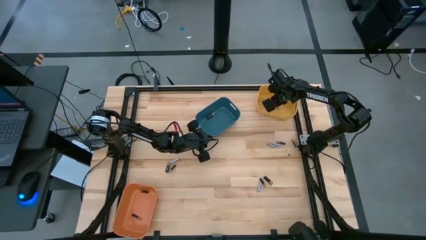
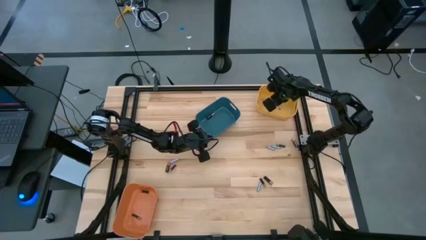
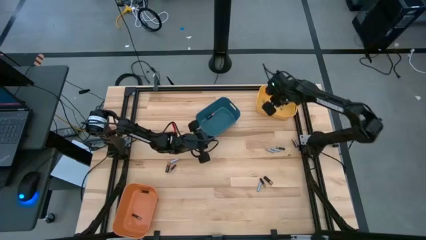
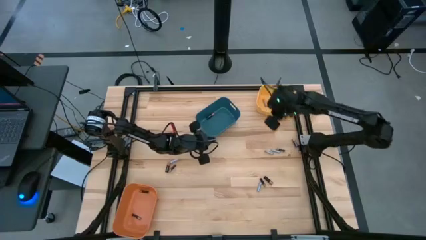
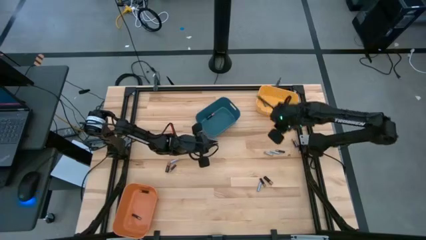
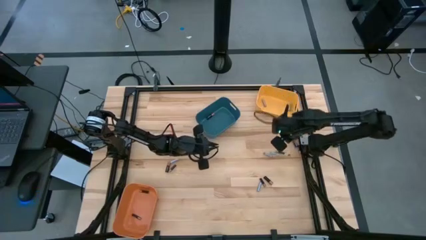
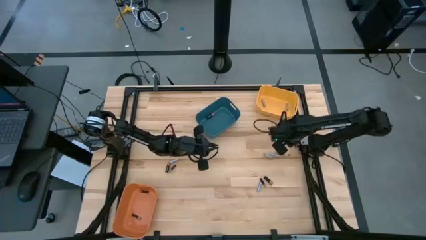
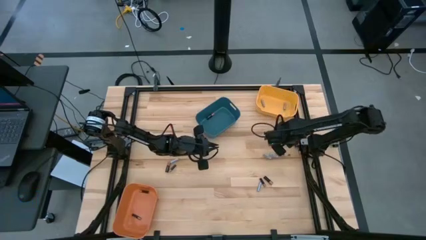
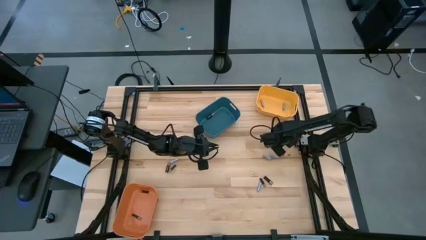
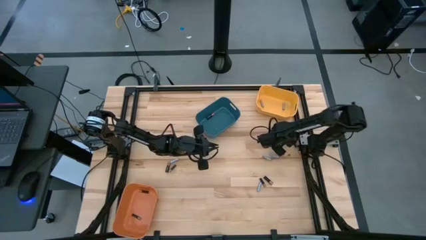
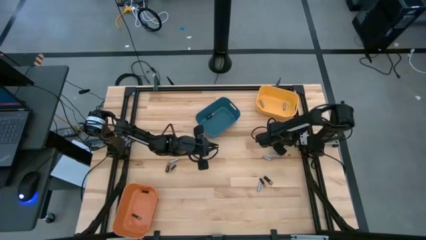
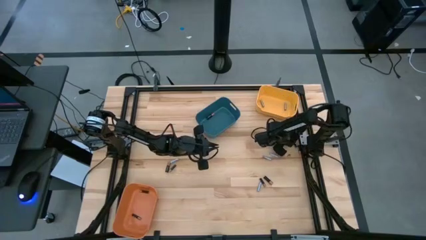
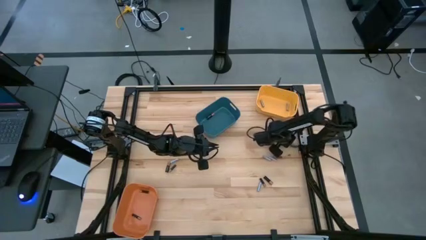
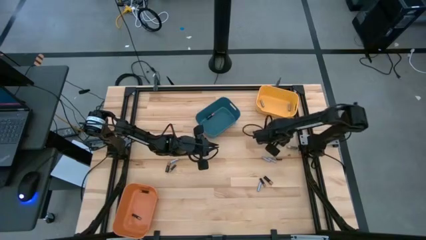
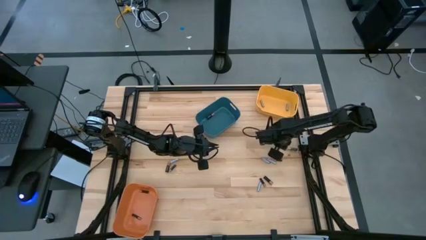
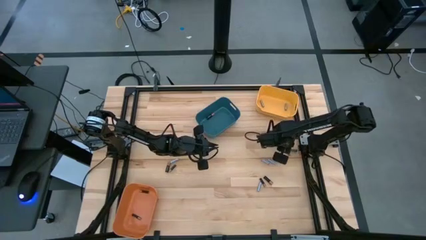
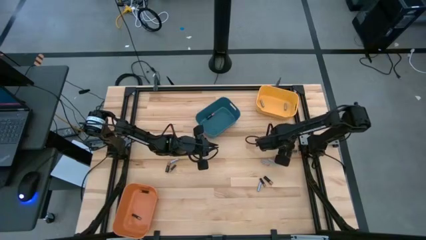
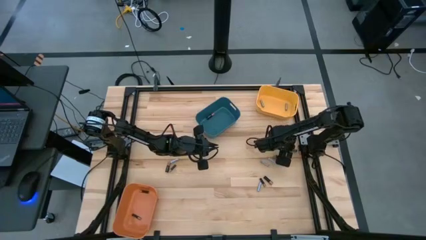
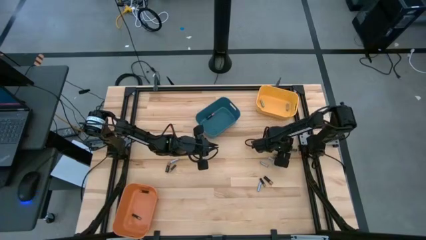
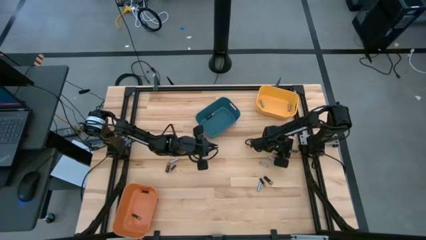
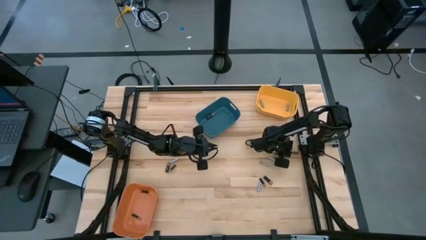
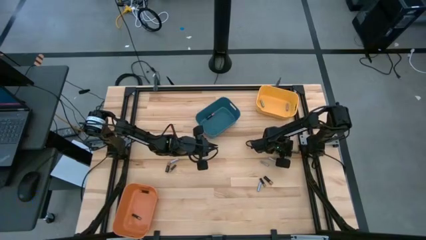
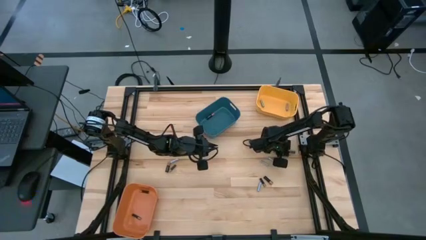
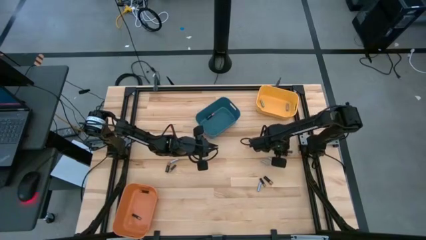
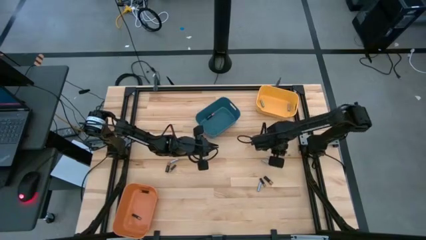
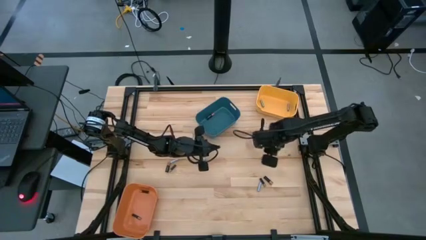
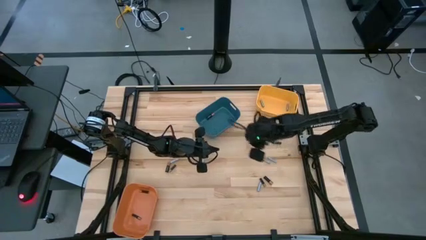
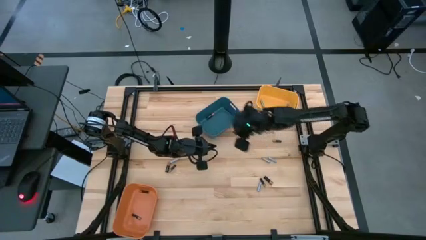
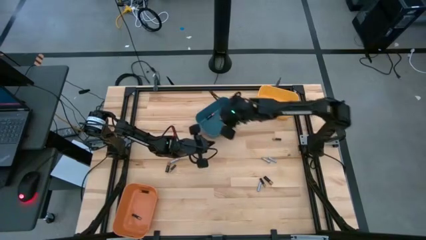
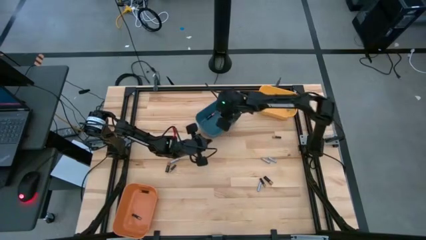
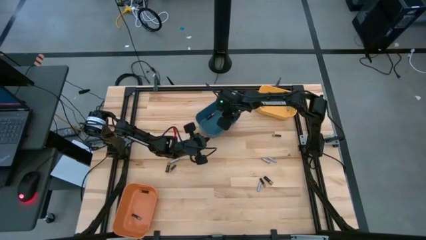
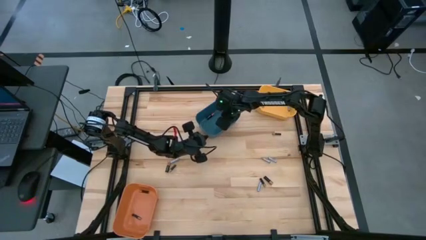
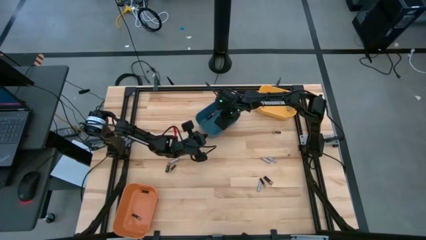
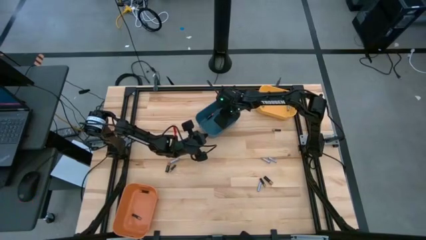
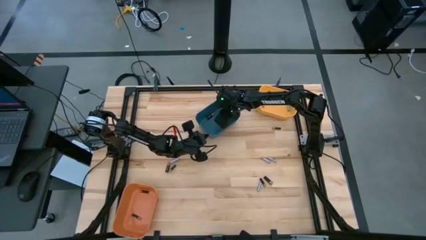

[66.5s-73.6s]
Task: Sort batteries
Put the large black battery into the blue bin

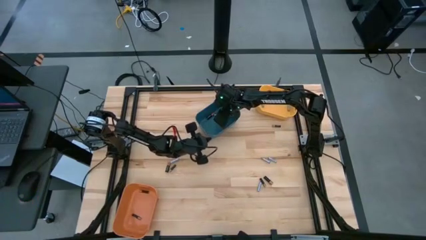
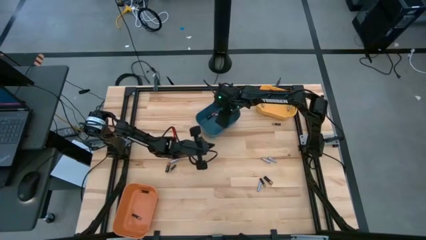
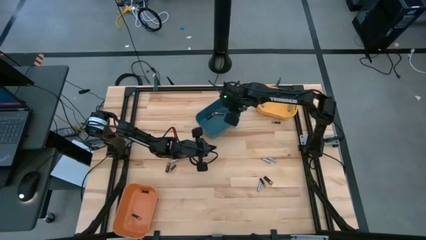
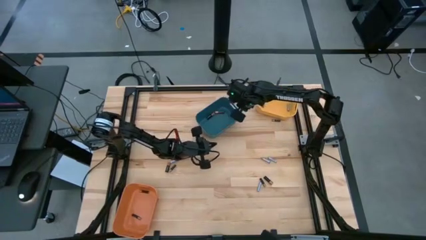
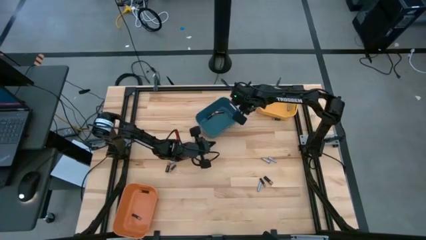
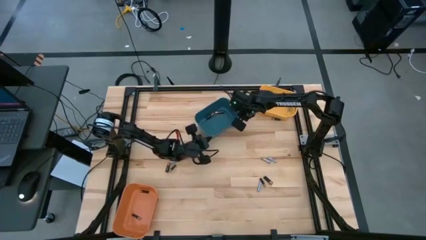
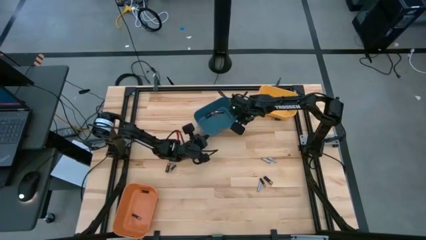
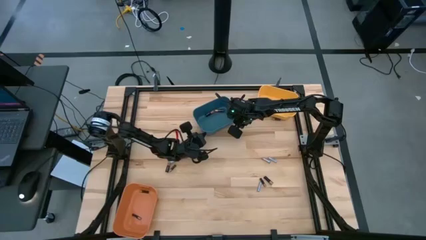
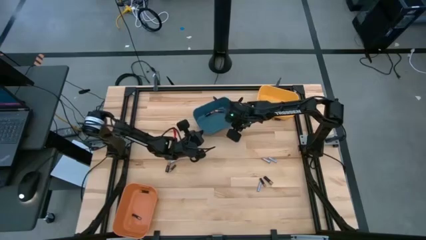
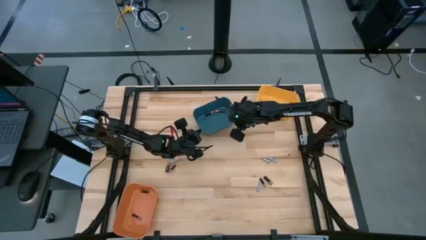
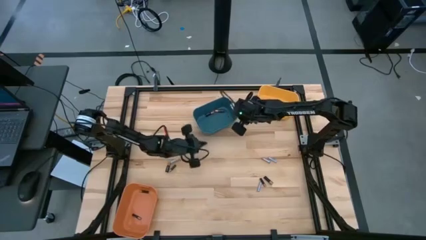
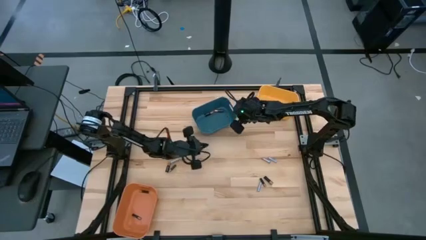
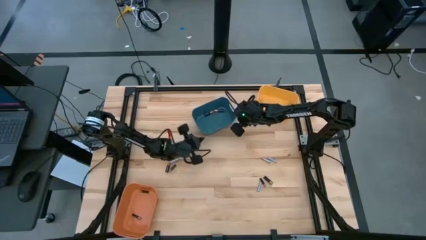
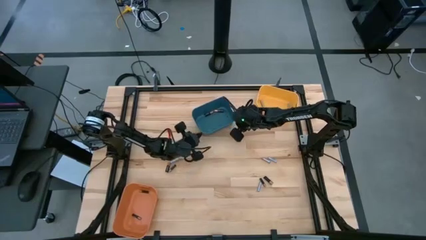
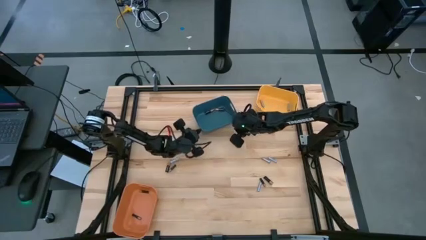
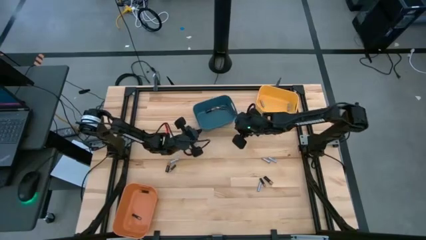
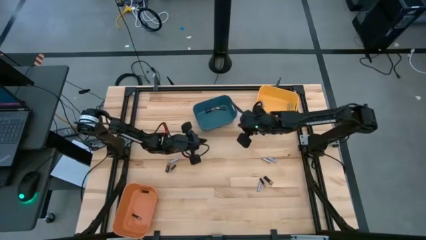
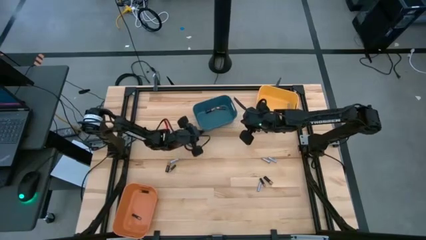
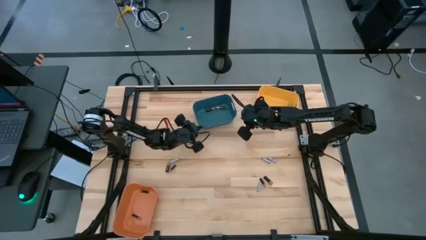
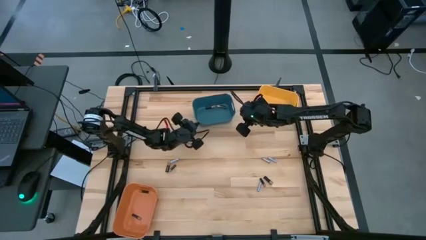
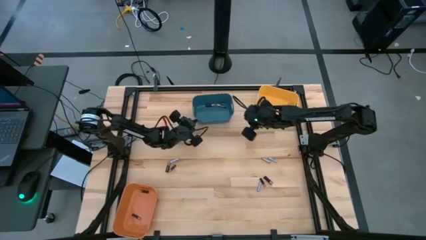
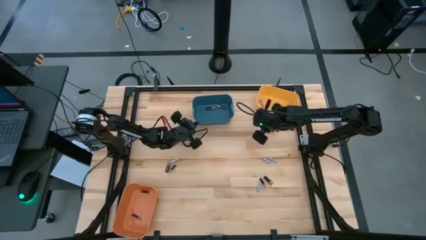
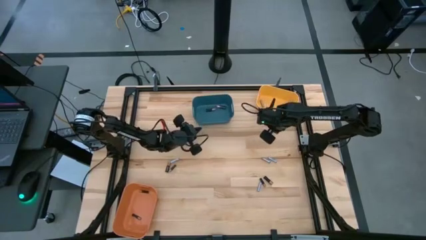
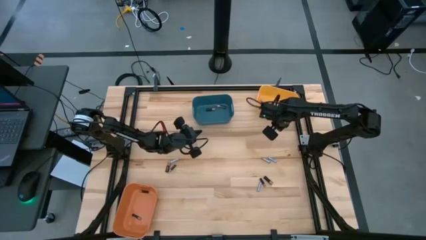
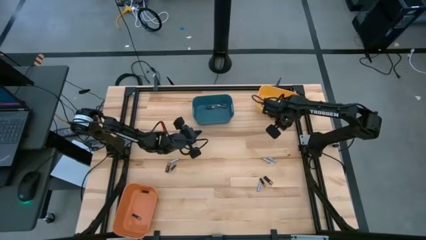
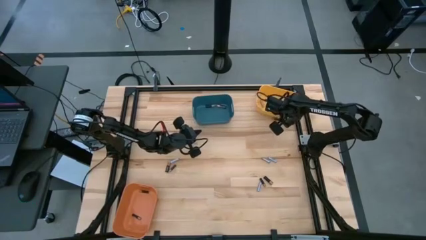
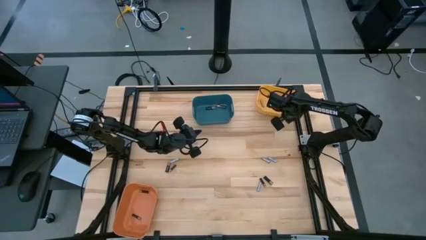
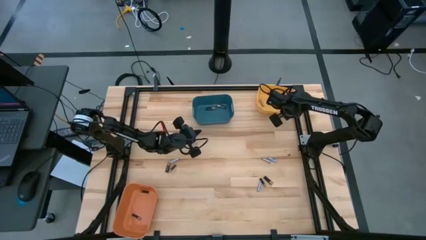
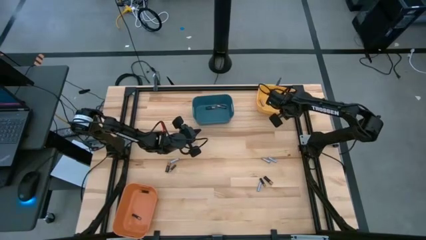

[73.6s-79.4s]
Adjust the blue and yellow bin

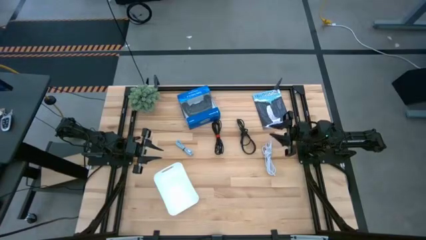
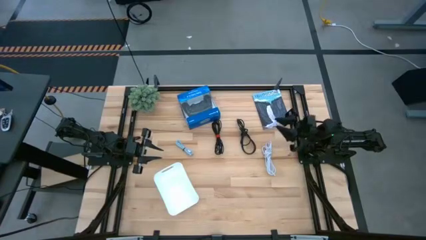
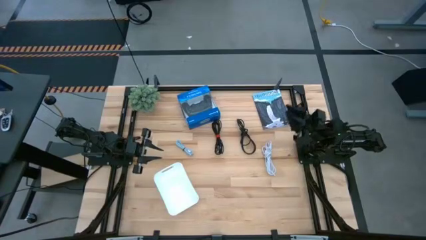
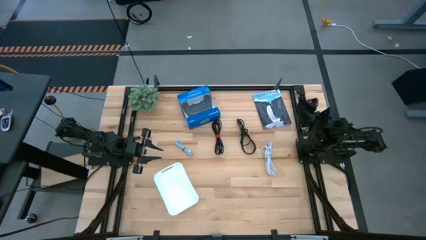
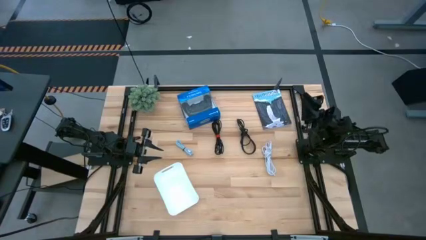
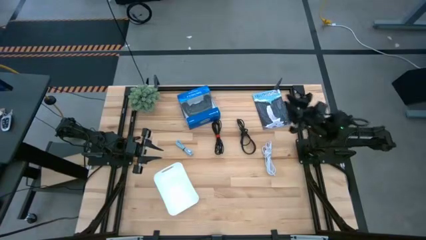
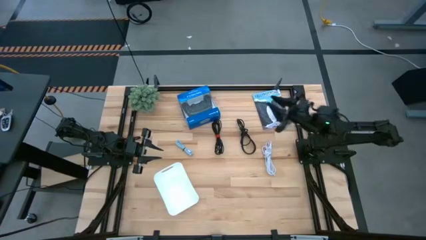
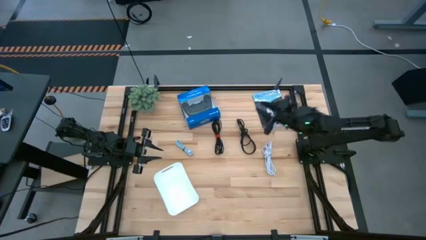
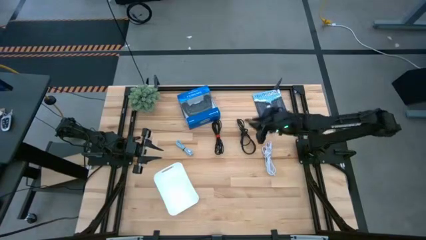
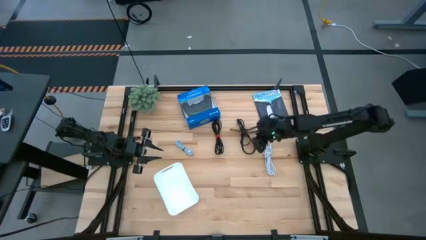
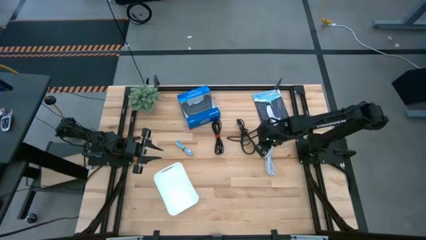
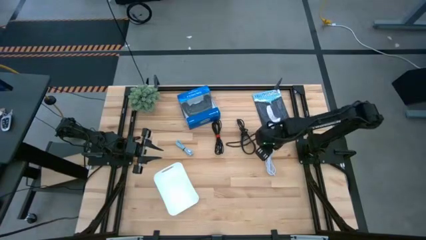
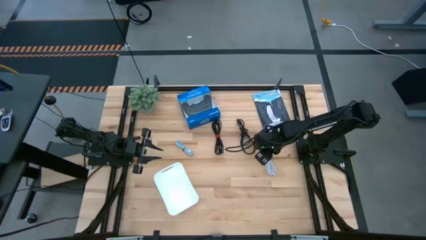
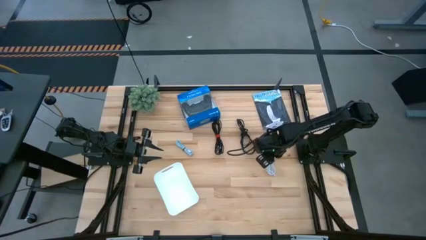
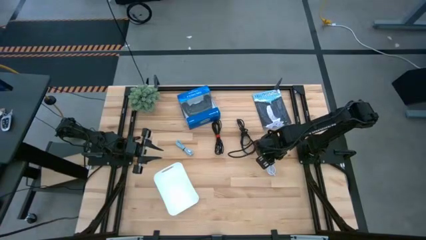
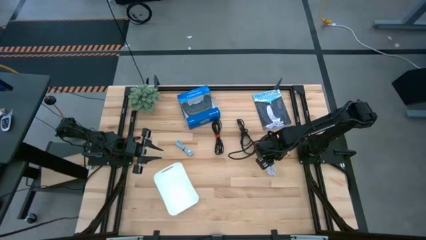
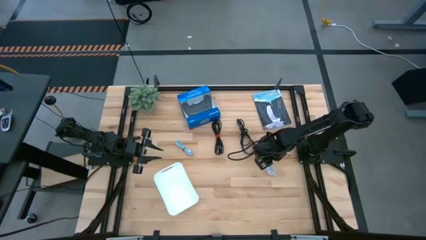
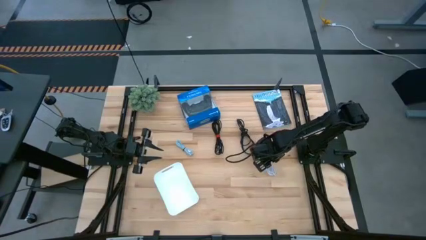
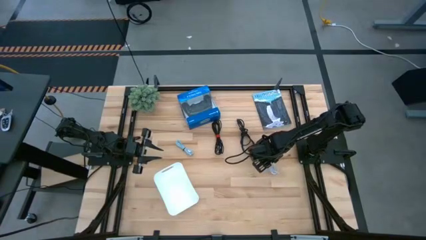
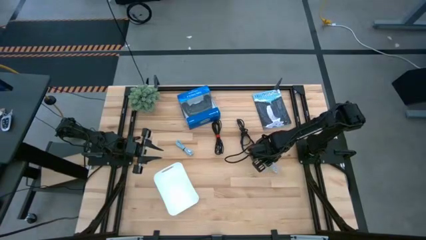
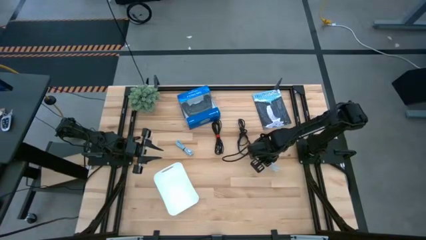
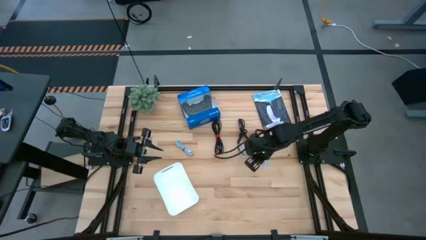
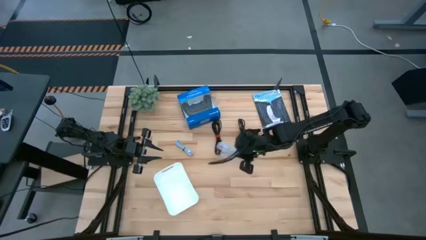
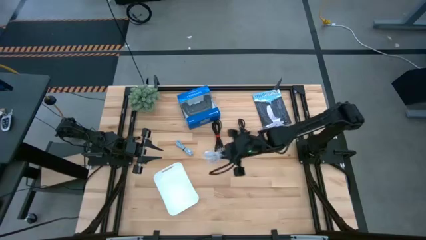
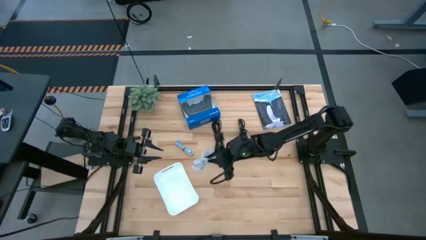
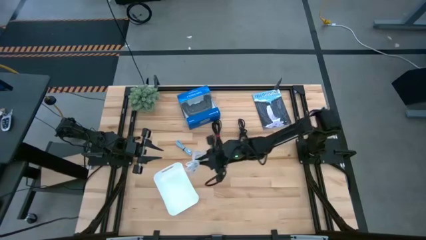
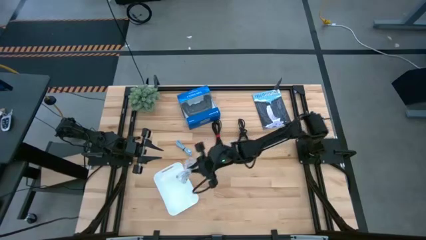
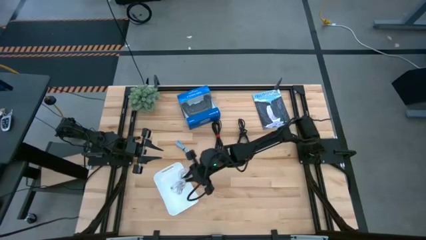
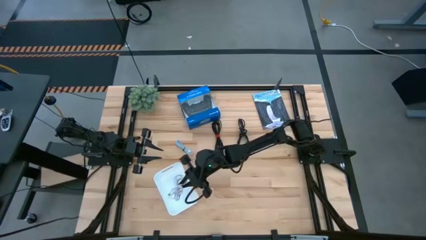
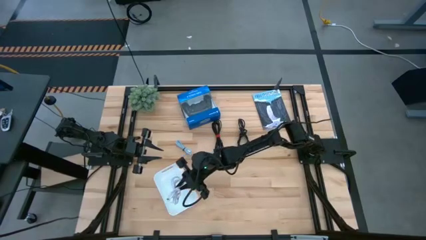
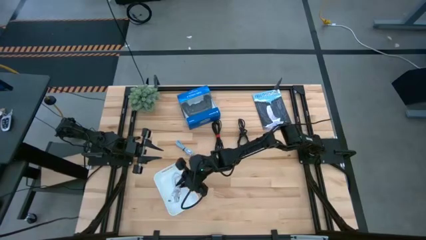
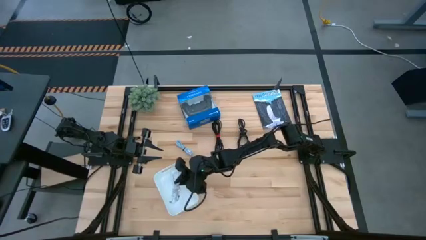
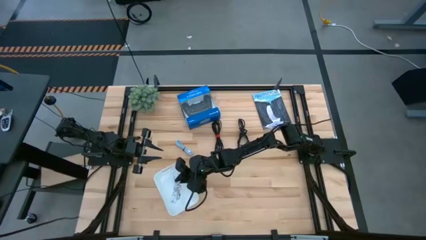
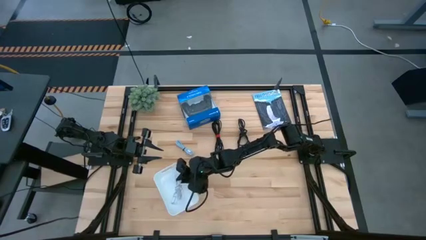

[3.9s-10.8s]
Task: Pick and place USB-C Cables
Put the white charger cable into the white basket
